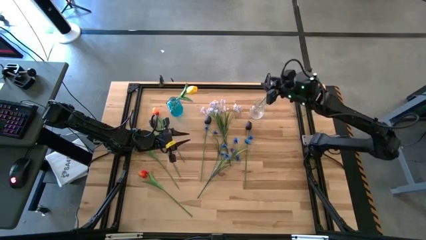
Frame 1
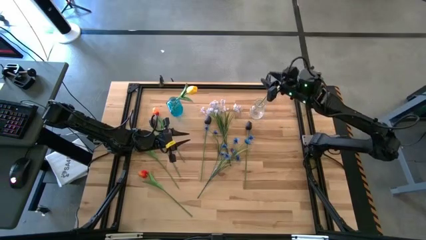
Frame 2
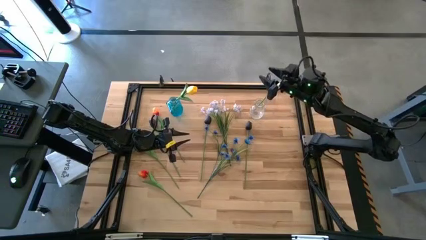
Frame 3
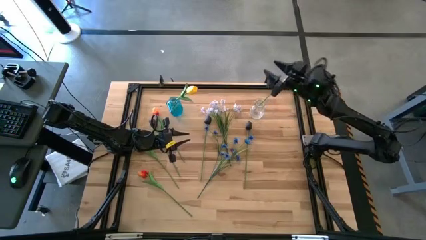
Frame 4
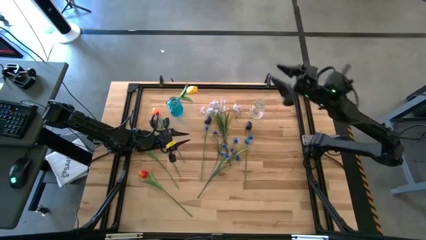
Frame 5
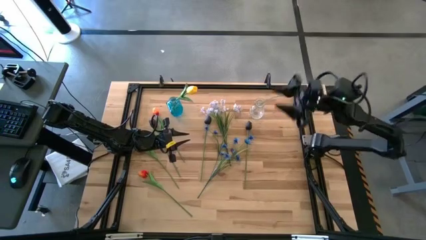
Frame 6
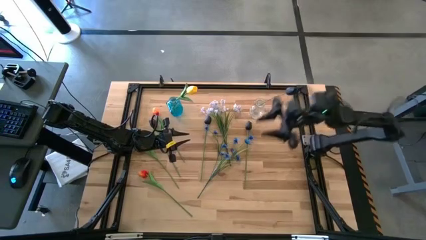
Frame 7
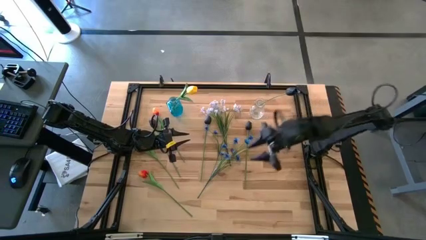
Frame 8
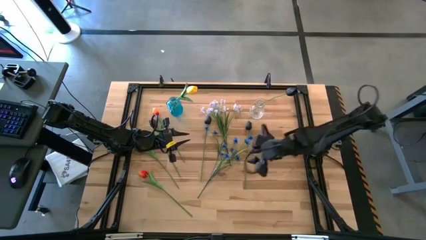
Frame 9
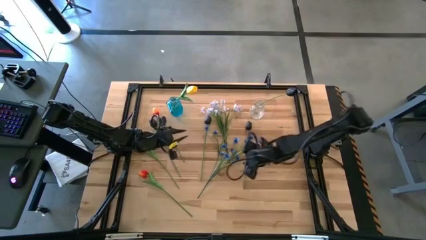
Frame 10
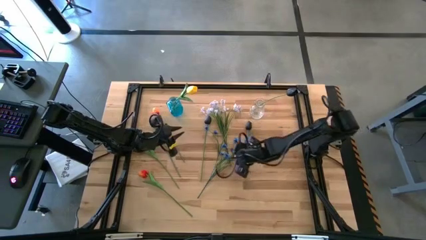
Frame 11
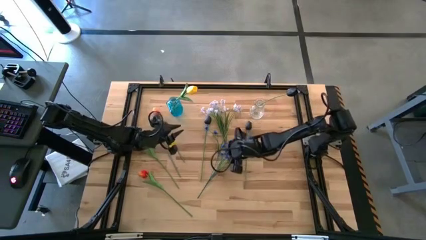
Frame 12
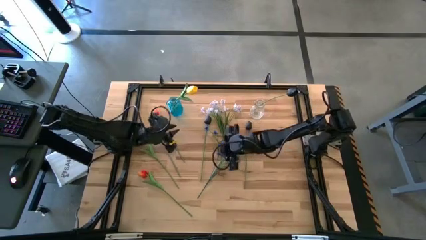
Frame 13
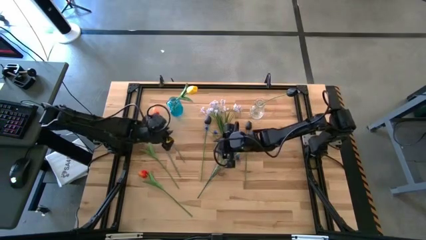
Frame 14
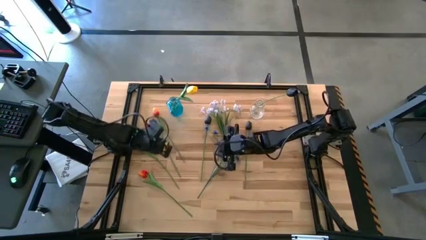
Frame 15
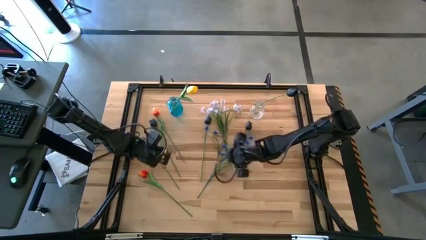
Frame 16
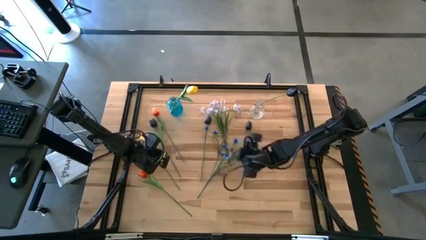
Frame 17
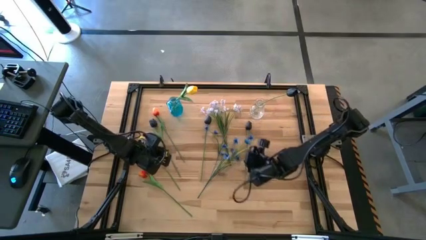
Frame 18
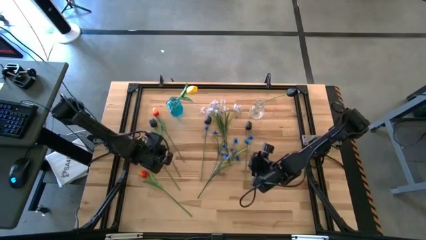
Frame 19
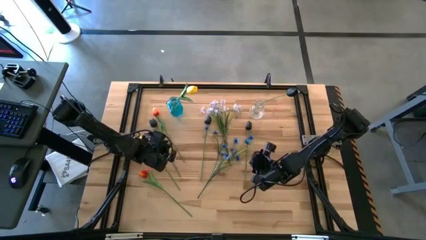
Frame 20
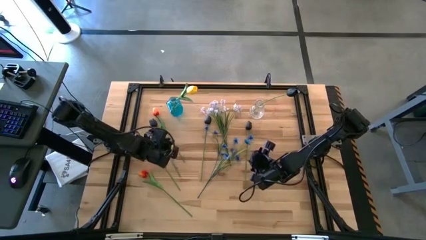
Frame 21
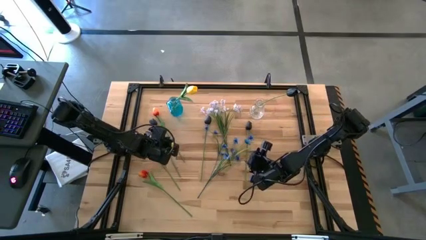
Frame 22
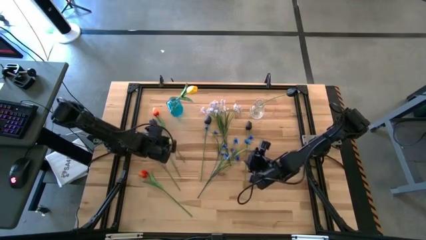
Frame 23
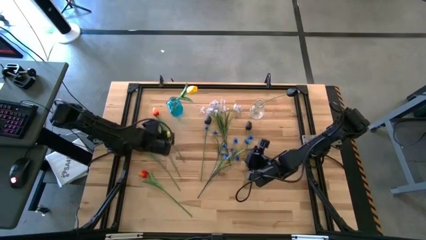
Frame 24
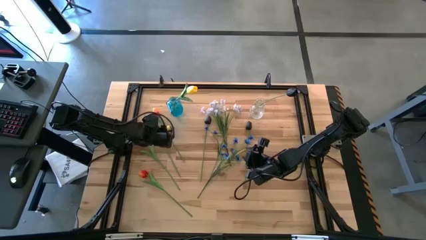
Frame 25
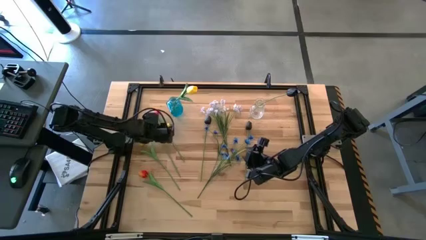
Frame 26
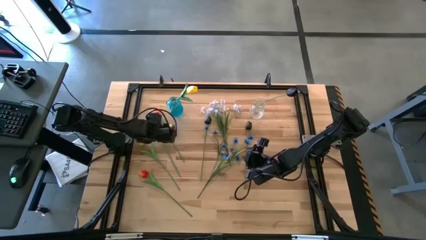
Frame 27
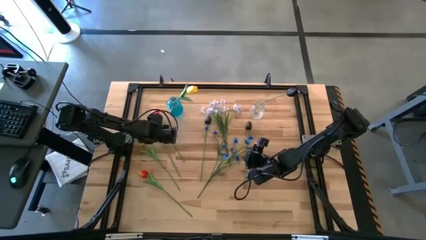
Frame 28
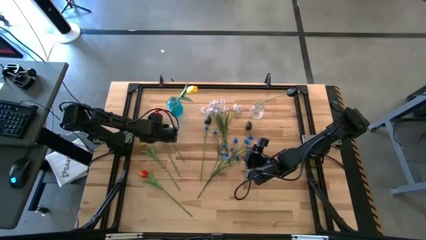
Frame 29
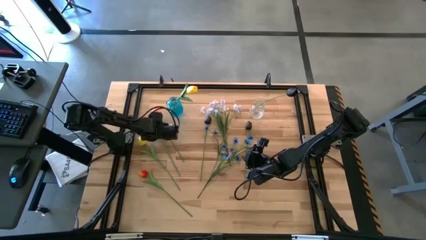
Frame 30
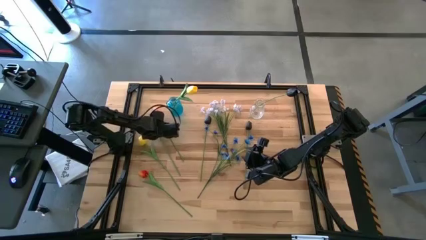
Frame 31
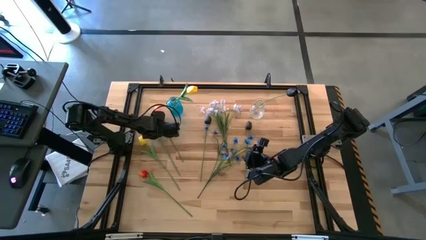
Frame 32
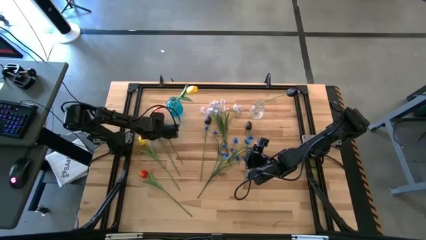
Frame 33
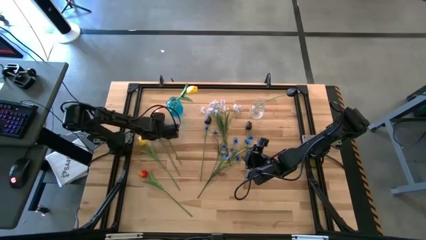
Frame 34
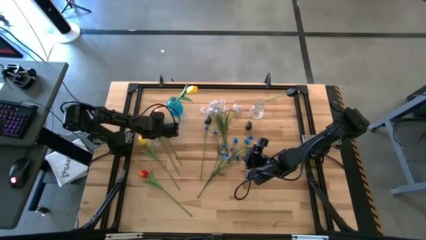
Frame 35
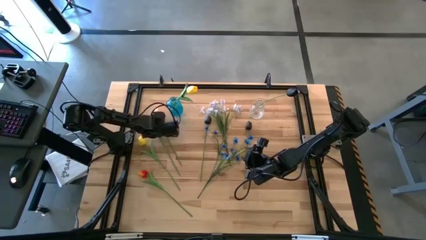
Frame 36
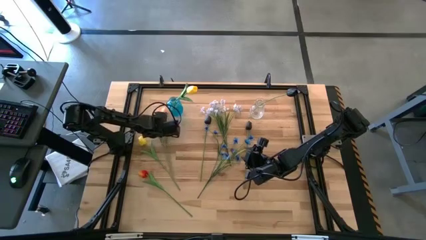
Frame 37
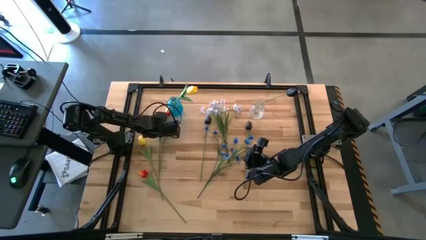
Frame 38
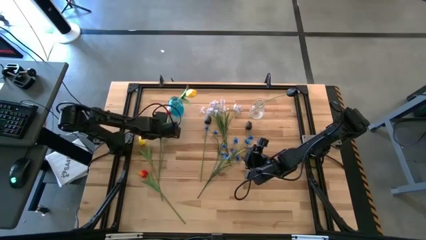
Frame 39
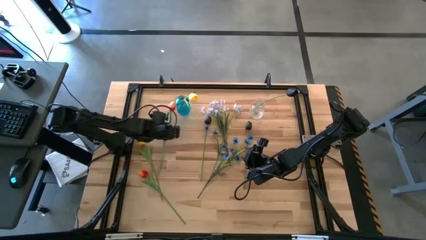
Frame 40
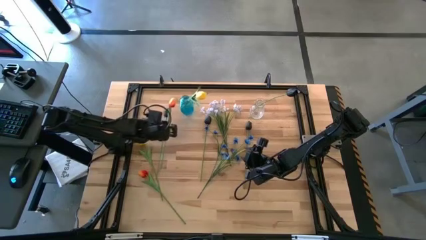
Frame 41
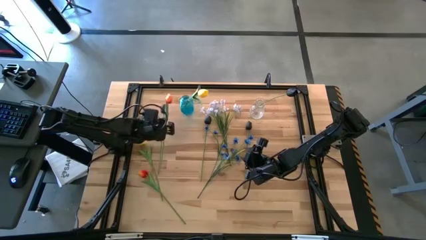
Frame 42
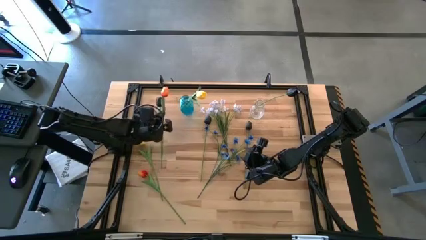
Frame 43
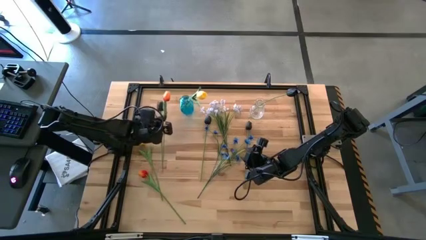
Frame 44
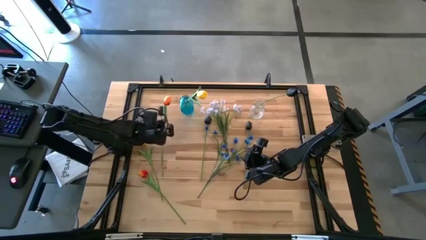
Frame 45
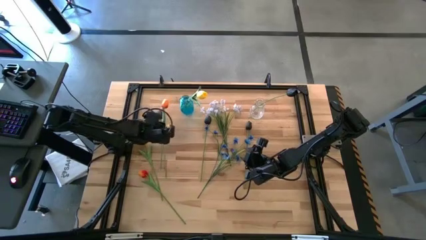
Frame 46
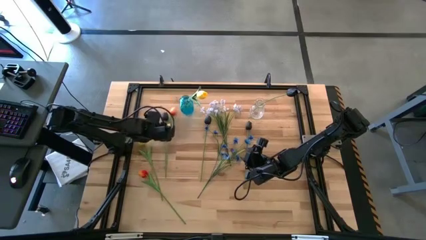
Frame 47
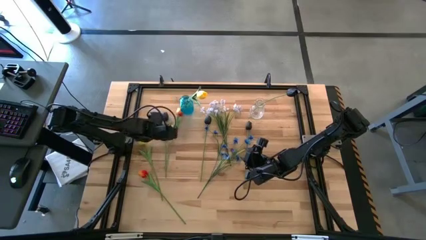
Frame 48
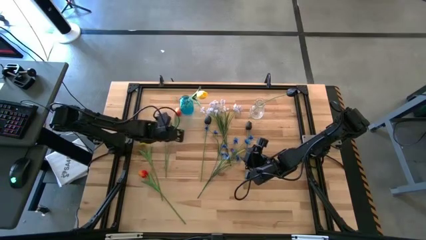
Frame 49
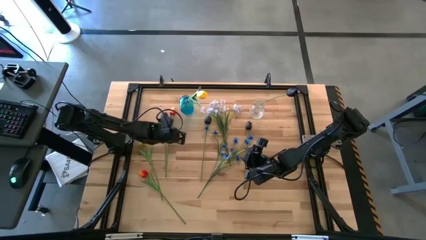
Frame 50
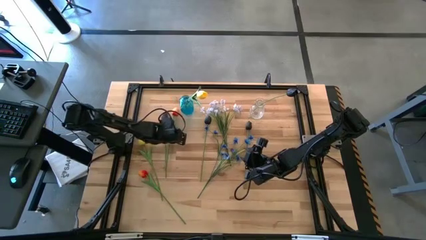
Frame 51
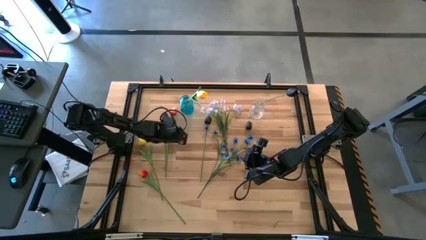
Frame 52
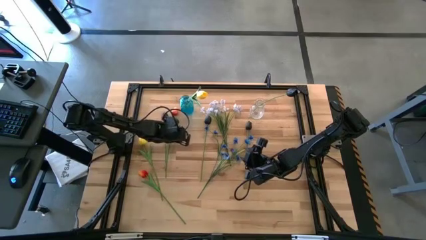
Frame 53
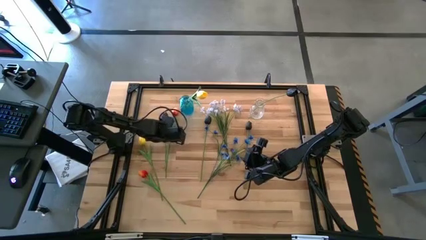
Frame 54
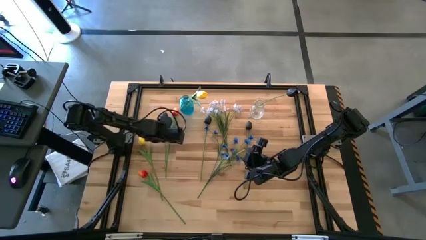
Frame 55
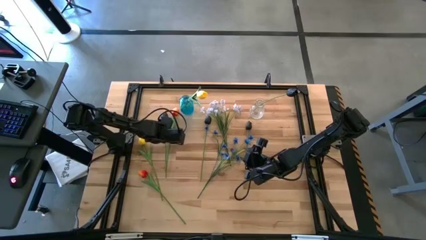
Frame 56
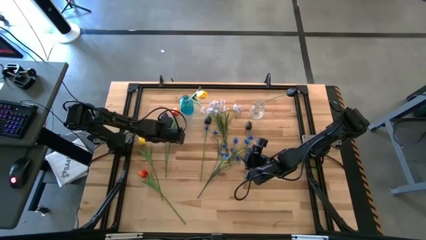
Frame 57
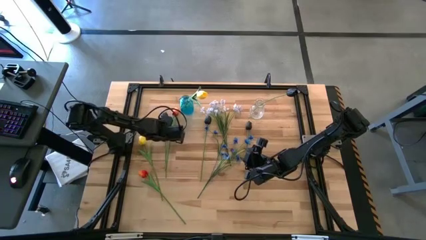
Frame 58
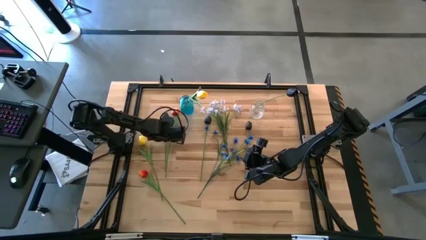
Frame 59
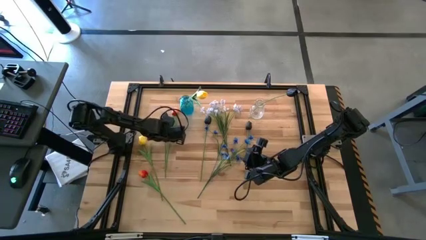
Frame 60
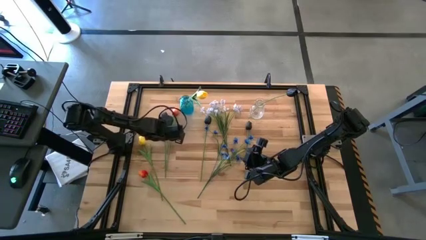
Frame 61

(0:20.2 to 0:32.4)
Task: Sort flowers into vase by color
Put the orange flower into the blue vase

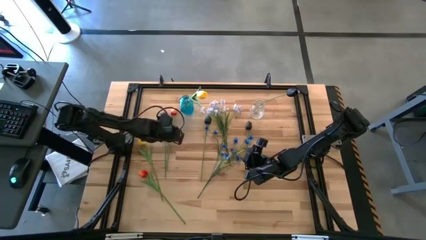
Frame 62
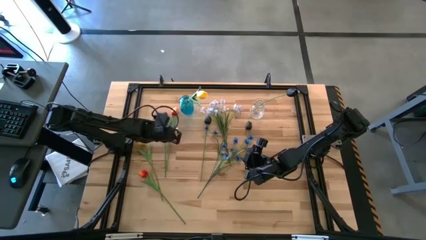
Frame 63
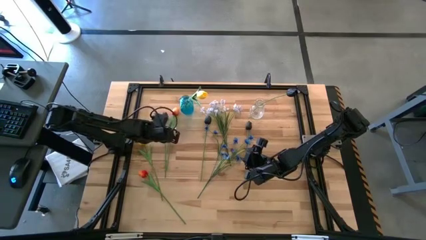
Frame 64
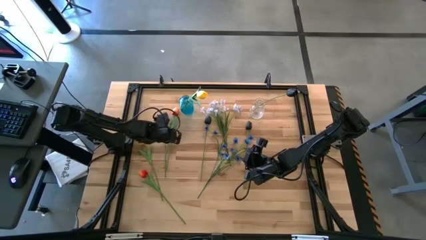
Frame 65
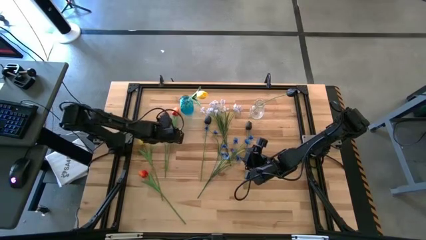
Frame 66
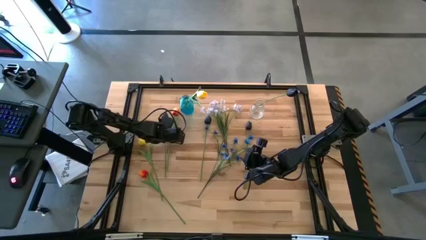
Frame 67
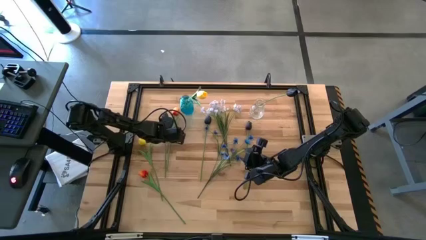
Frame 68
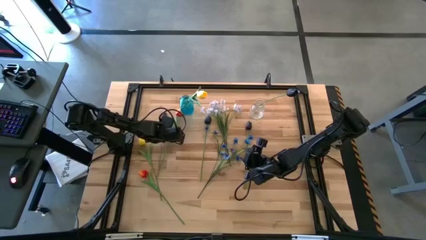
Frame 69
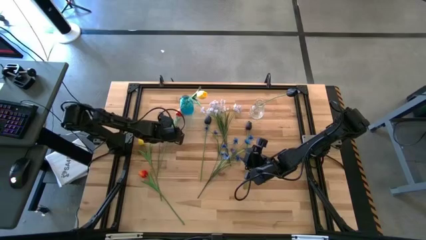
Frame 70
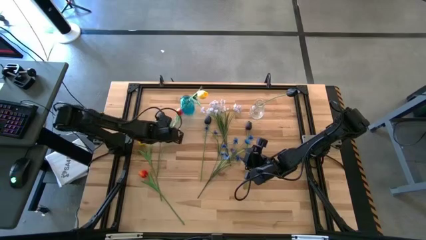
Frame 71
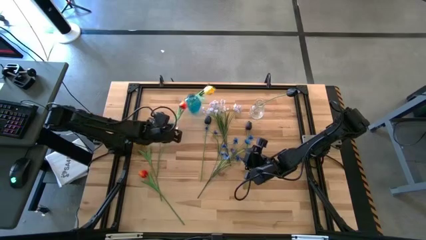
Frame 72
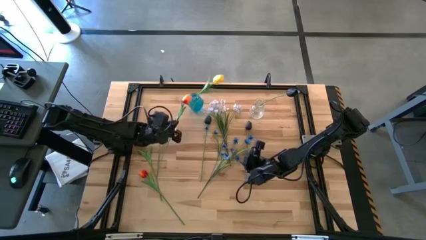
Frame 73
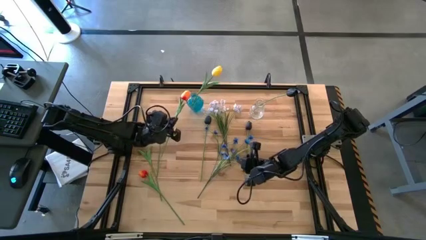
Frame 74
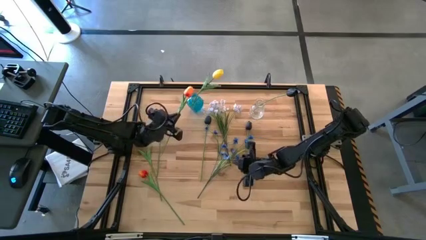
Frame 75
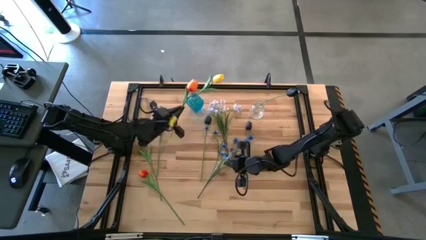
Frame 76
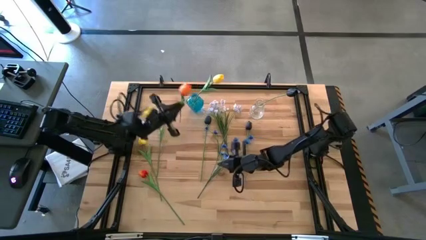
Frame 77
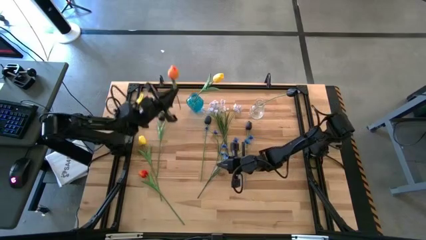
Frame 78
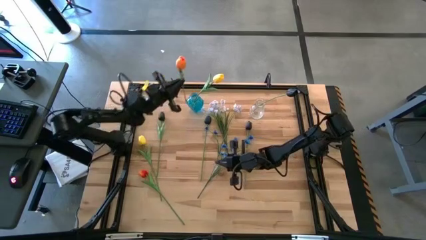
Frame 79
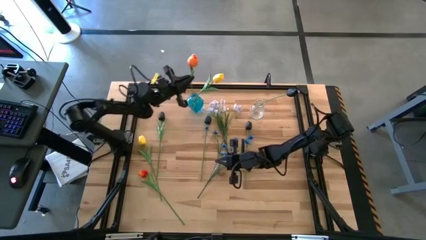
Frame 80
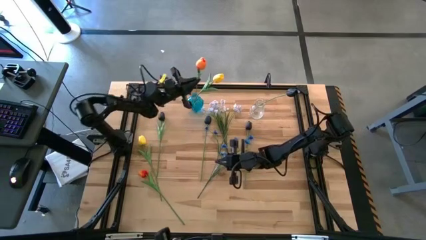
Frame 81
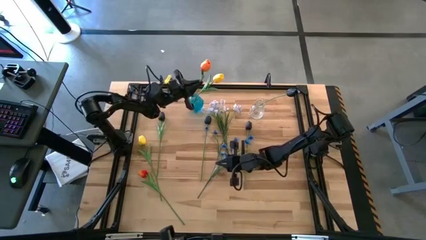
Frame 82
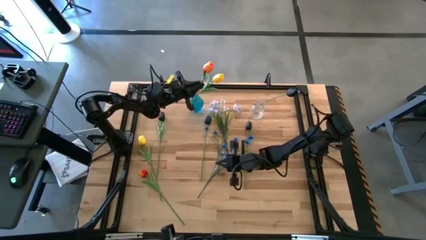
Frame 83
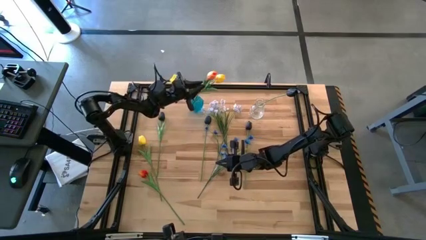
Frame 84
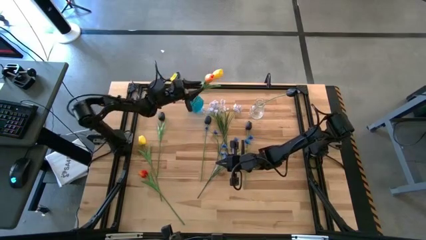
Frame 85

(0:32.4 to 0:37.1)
Put the orange flower into the blue vase
